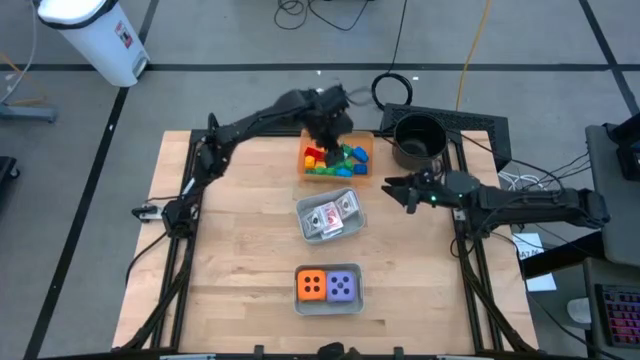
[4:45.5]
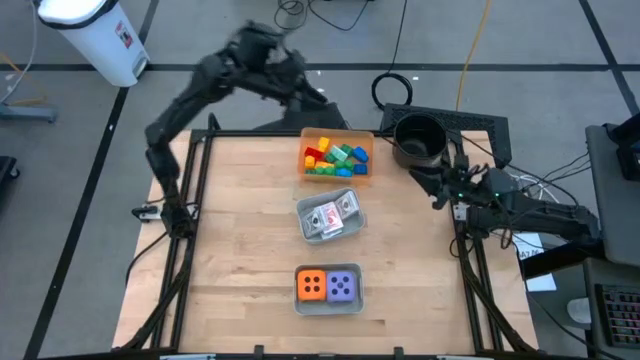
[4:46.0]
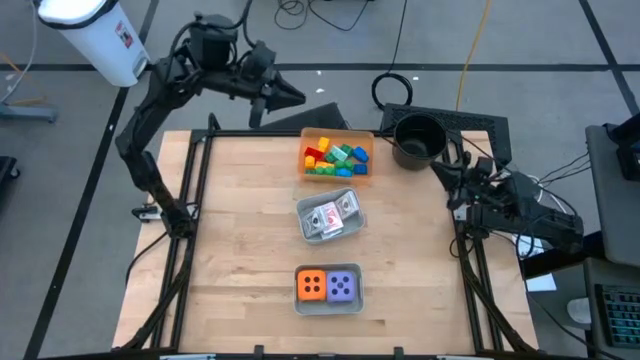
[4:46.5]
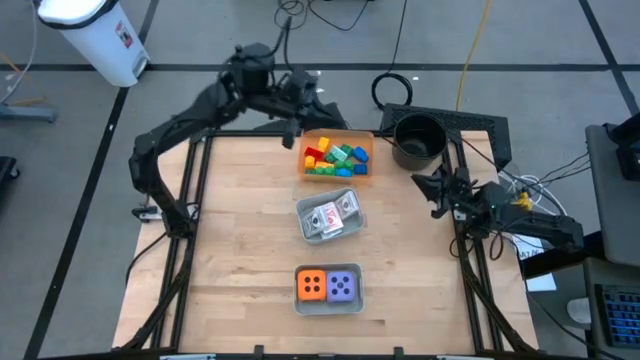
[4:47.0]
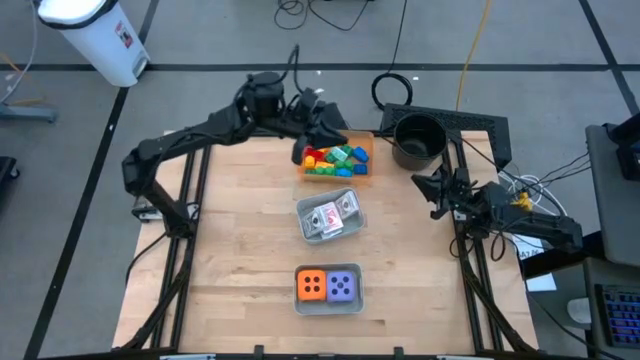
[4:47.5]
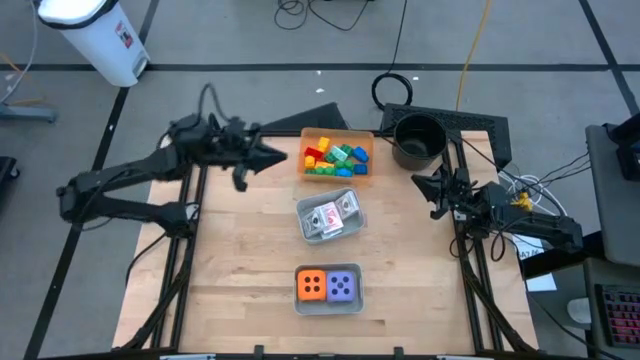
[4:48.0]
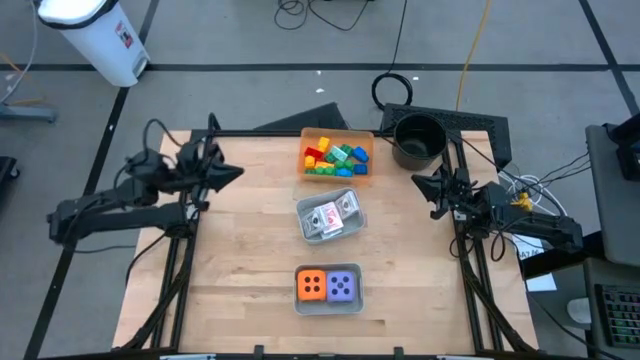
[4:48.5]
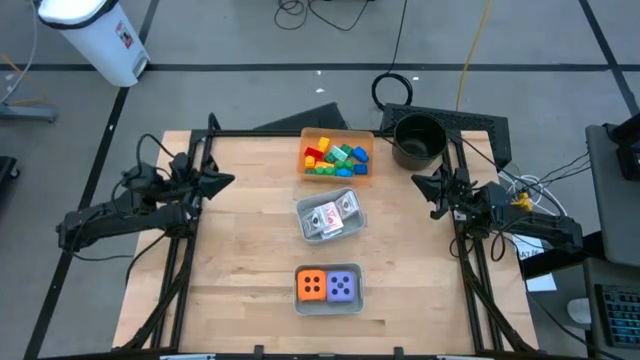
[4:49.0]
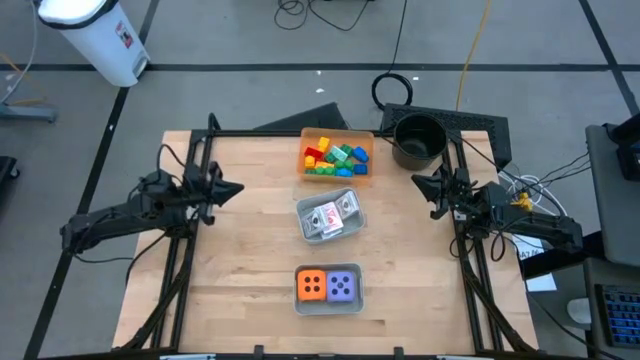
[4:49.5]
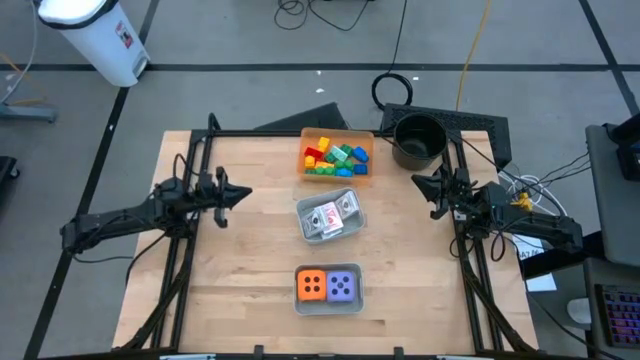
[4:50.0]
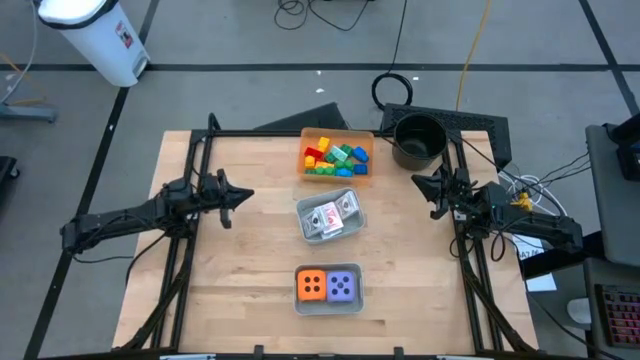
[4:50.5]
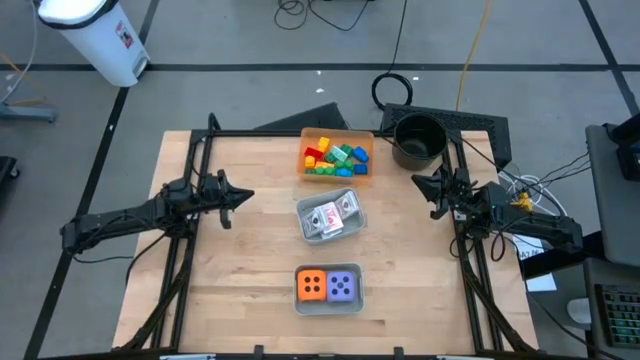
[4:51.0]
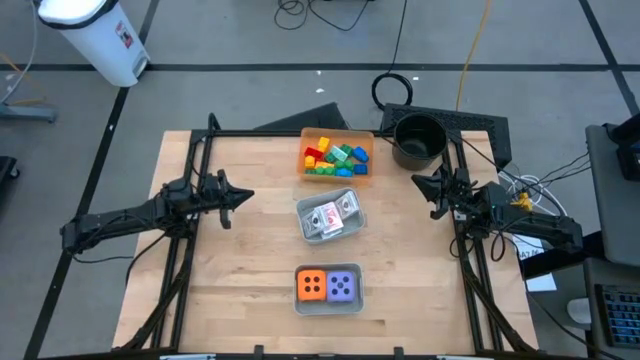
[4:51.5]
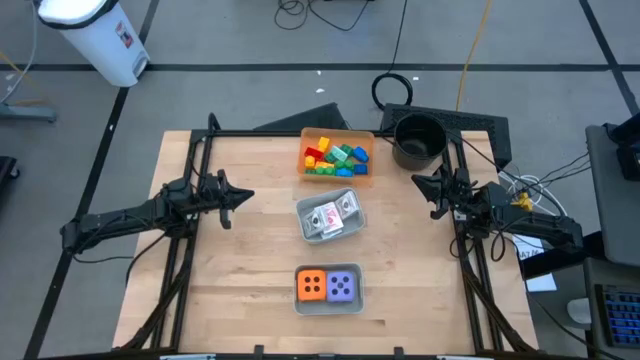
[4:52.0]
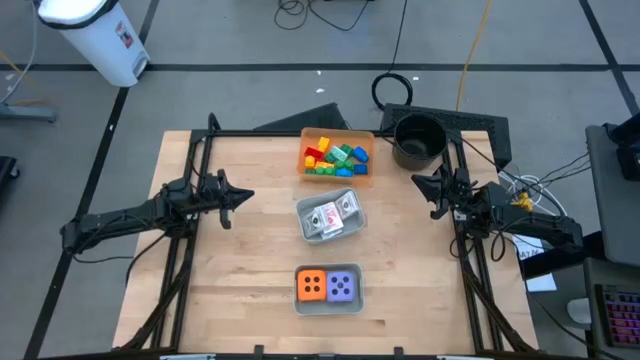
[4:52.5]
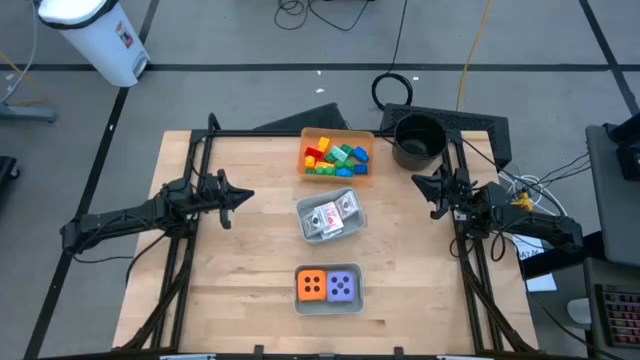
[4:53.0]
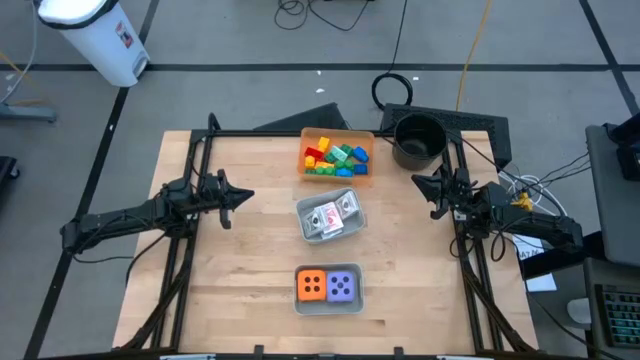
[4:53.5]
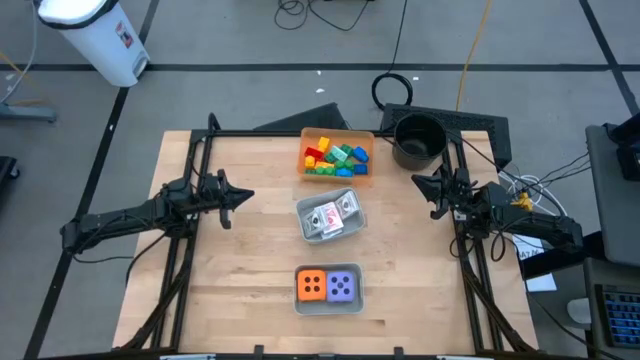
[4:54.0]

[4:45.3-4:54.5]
Task: Pick & Place Toys
Return to Home Position

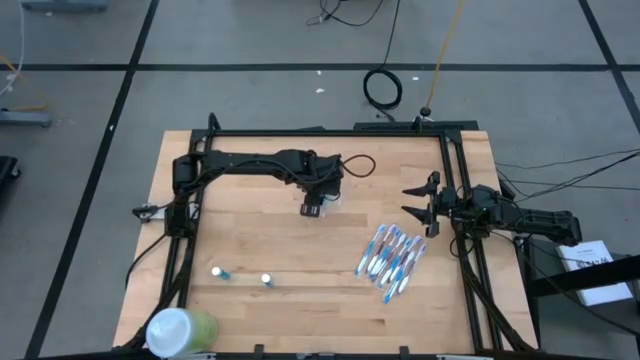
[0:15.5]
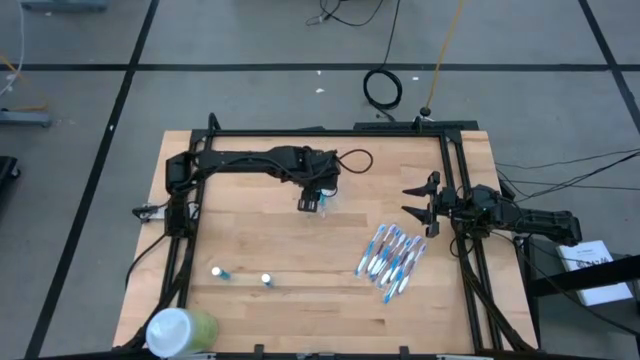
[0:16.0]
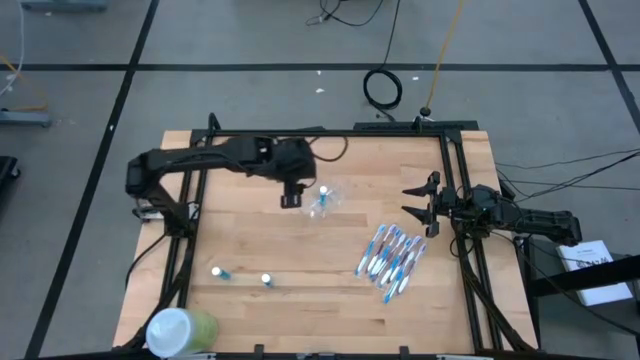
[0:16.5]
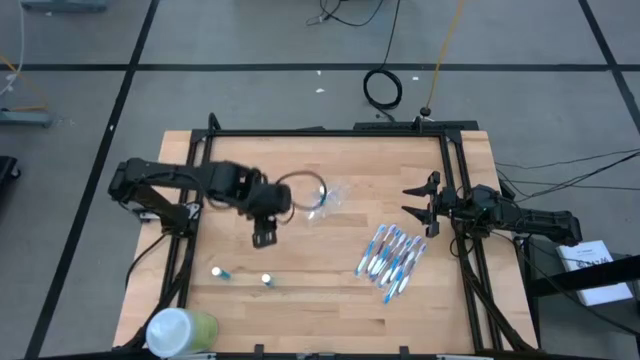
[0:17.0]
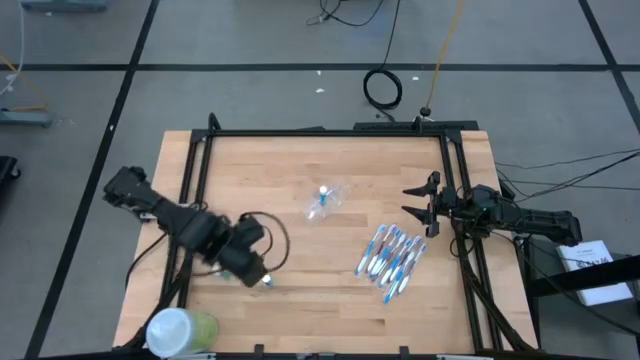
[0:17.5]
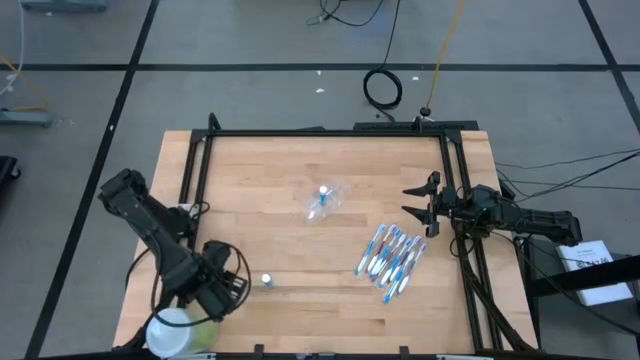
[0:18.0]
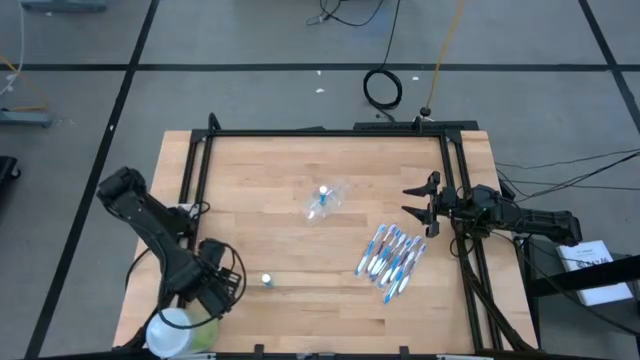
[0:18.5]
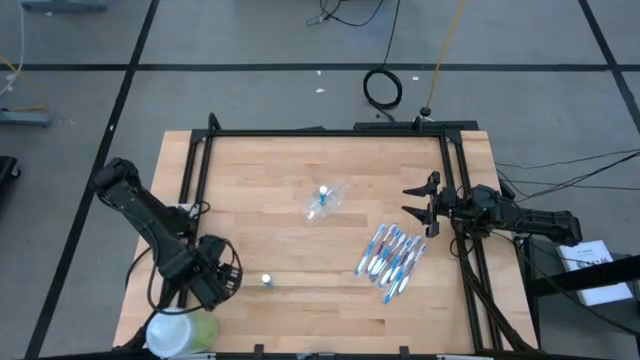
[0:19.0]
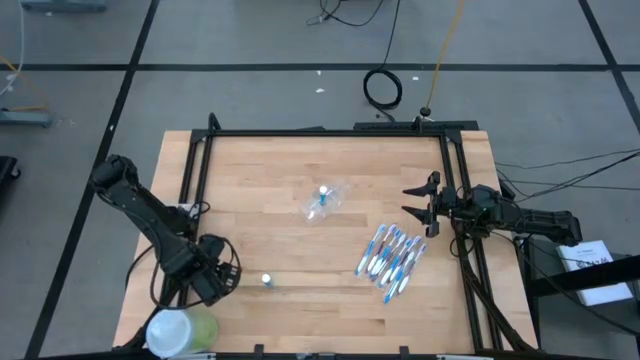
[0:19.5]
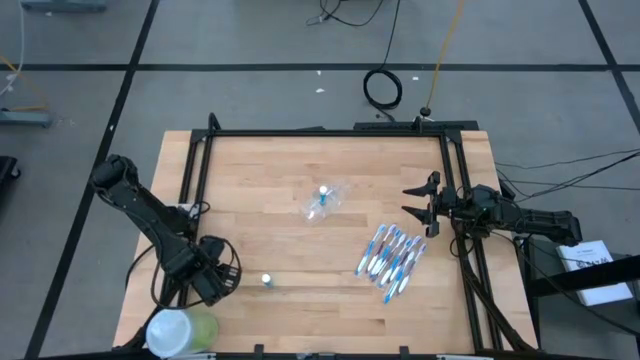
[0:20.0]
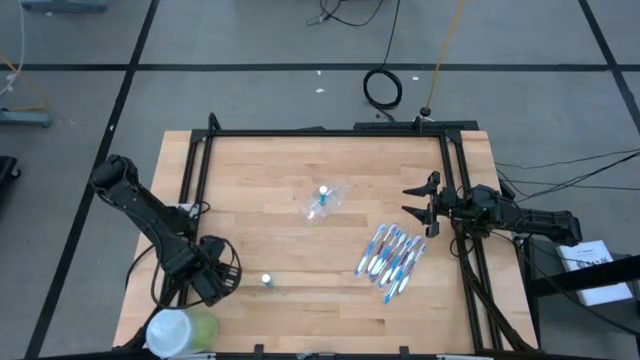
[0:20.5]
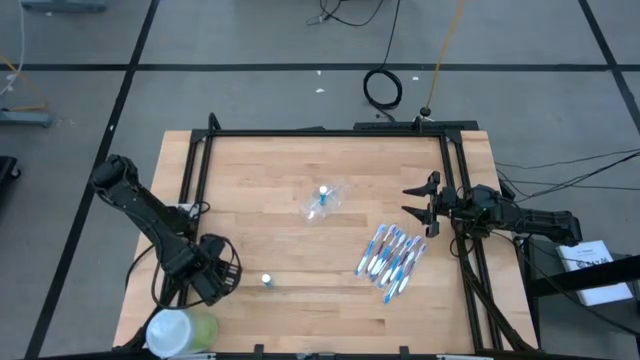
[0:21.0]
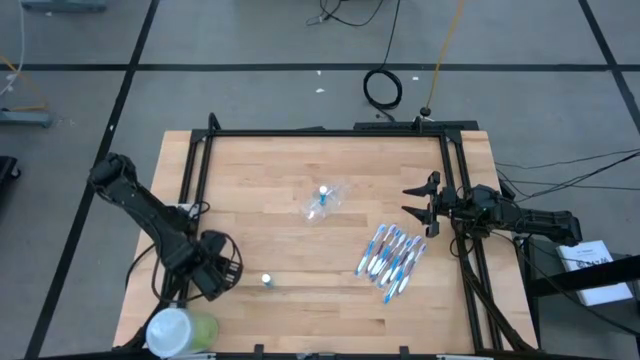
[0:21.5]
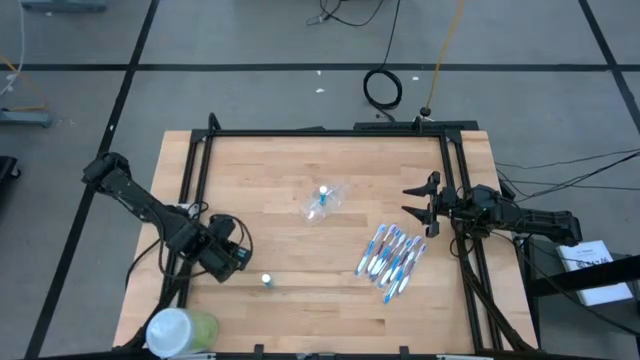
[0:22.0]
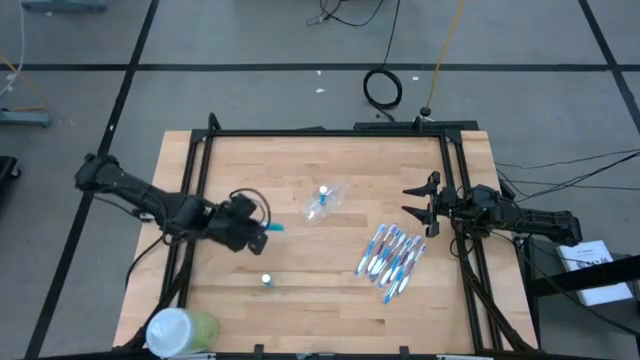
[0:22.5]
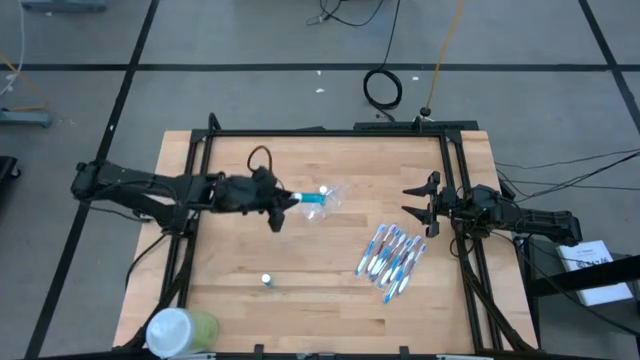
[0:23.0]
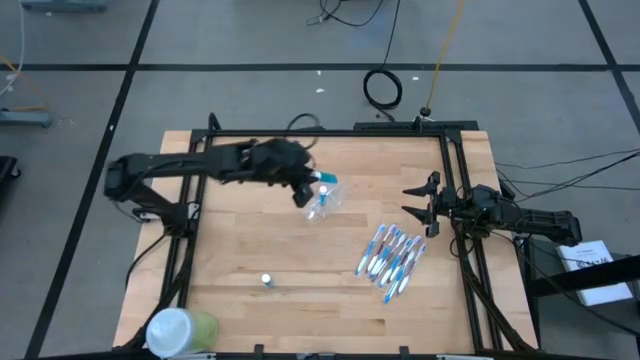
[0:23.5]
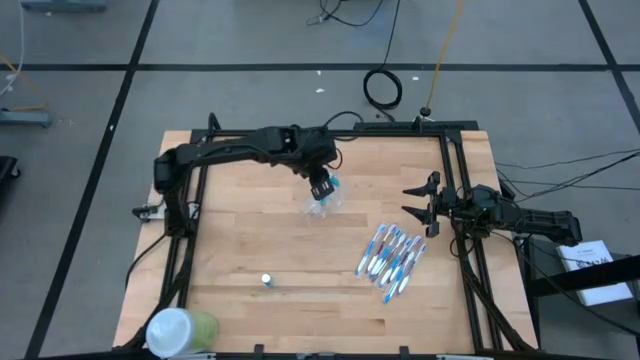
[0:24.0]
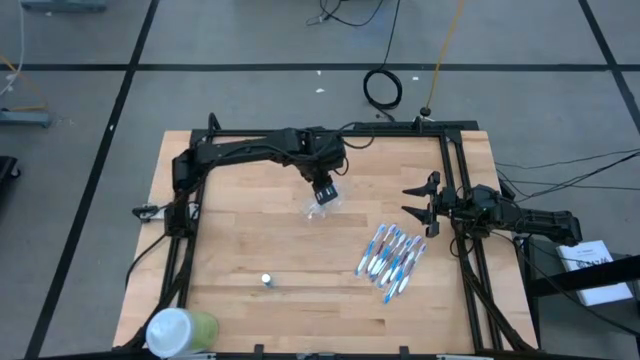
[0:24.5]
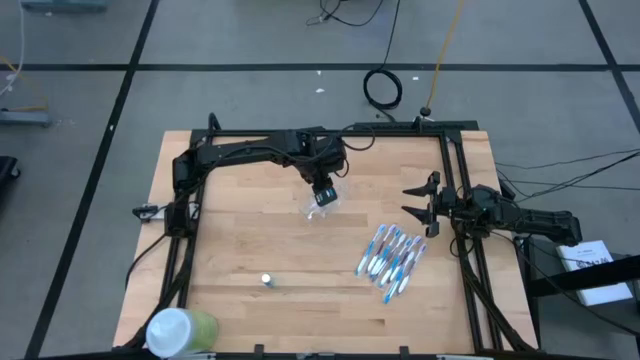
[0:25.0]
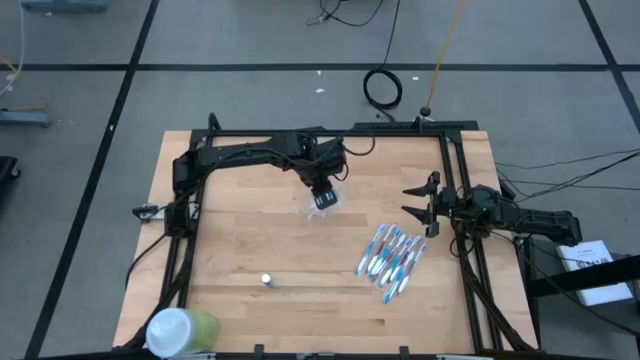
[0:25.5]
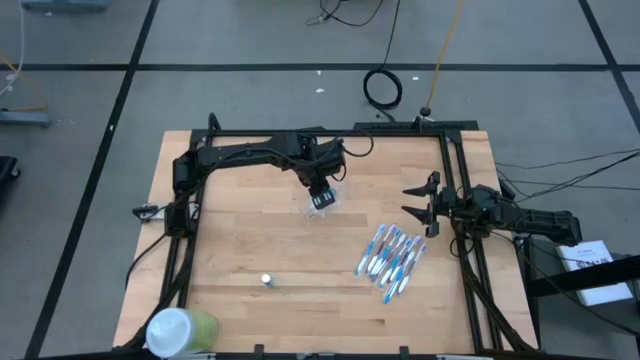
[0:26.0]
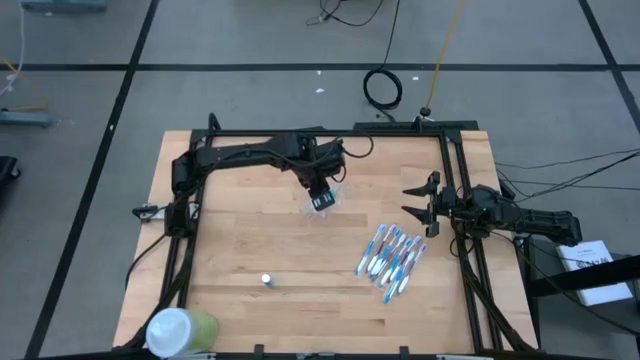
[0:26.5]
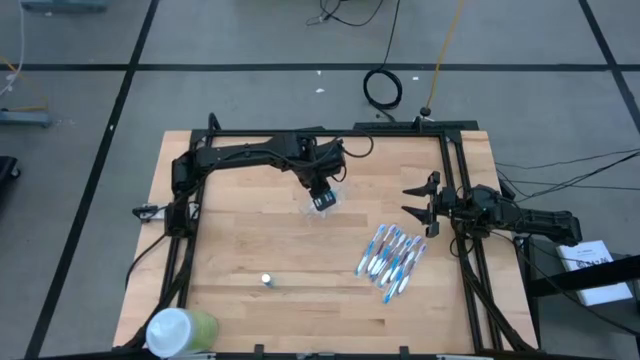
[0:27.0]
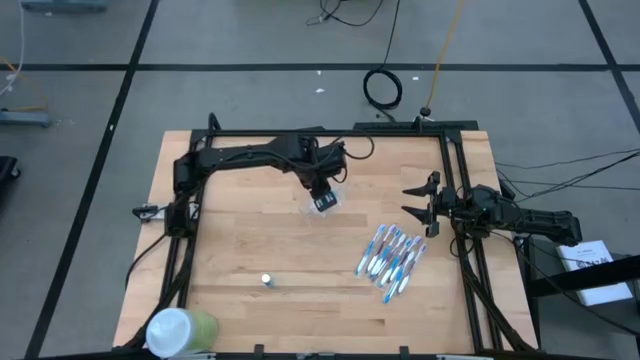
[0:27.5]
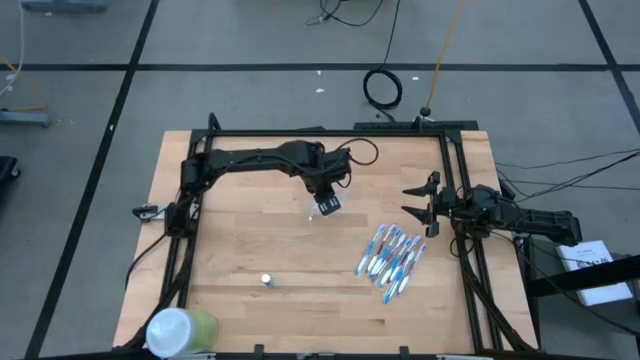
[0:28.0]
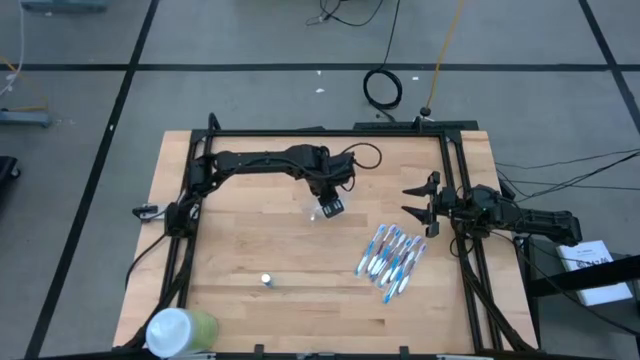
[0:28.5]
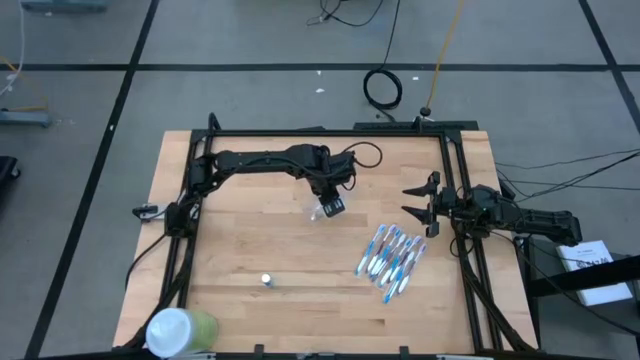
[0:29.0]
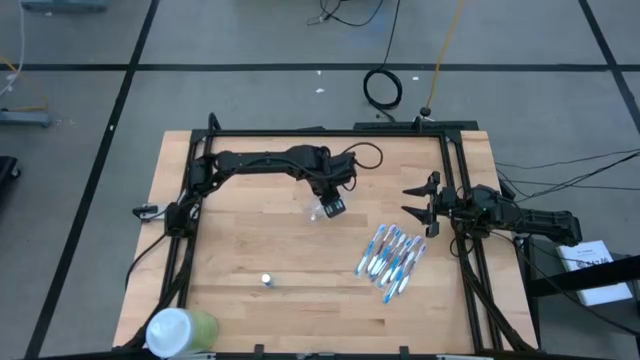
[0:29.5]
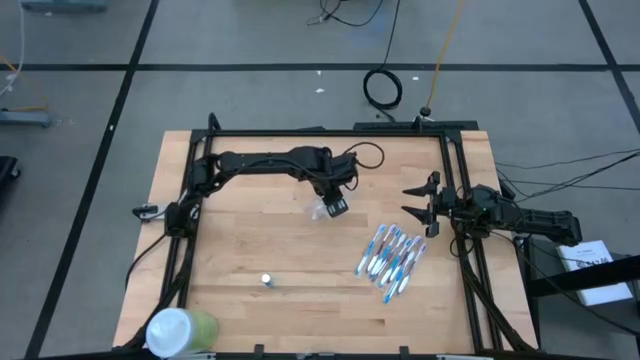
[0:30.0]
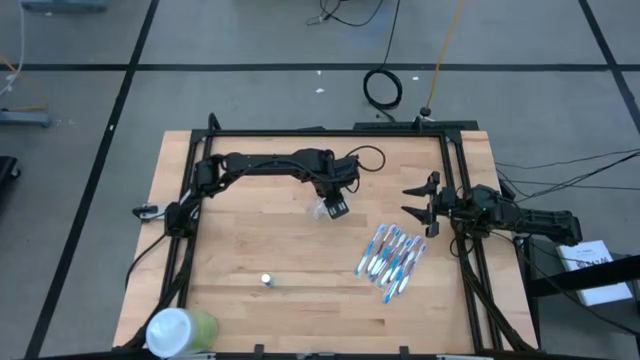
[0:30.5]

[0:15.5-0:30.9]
Task: Pick & Place toothbrushing station
Put the blue mouthwash into the transparent organizer
